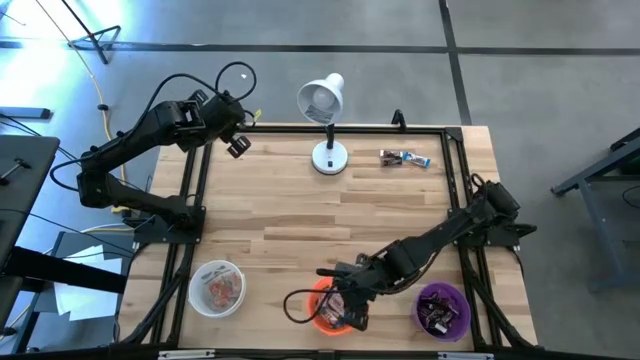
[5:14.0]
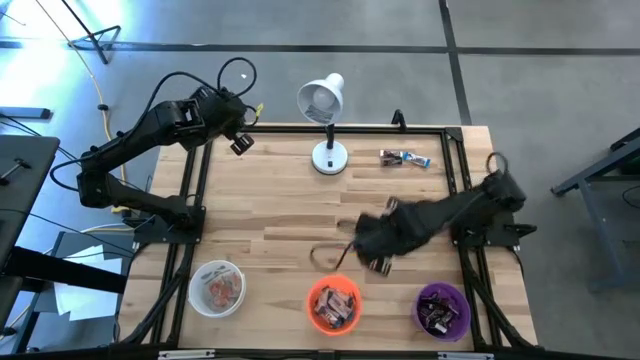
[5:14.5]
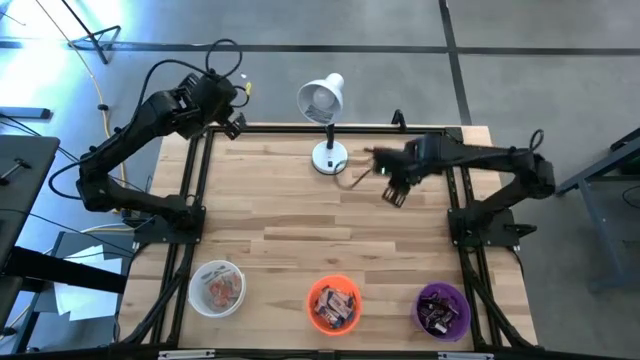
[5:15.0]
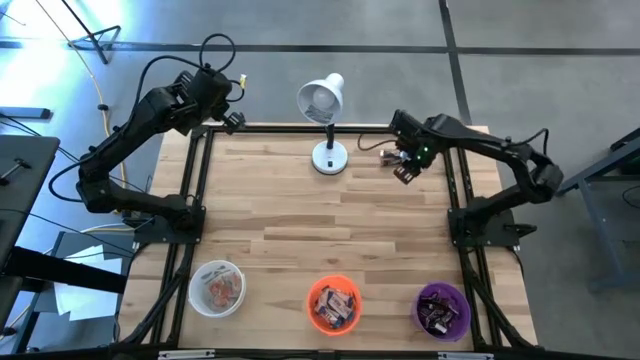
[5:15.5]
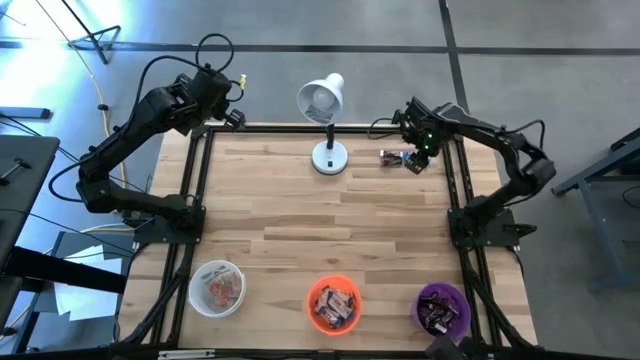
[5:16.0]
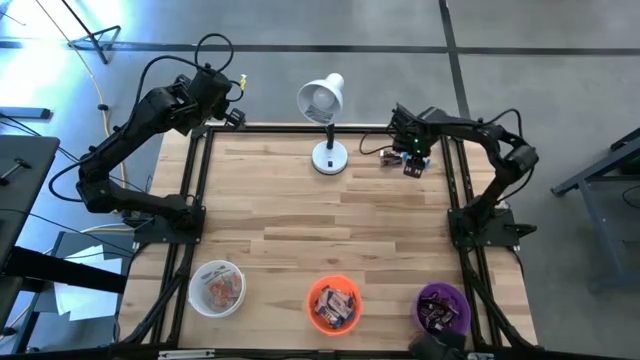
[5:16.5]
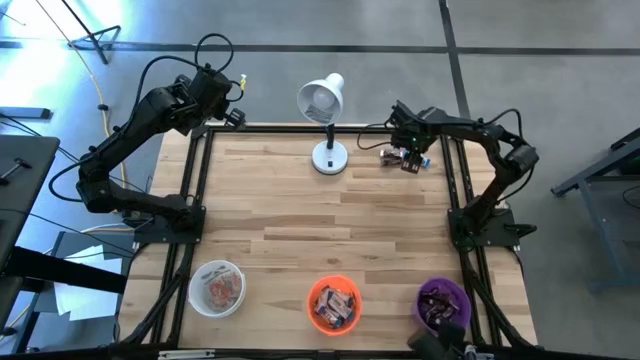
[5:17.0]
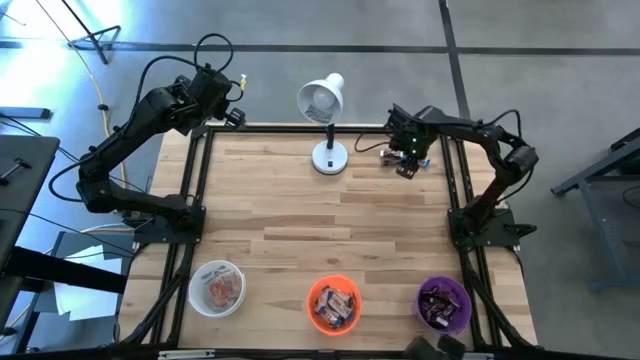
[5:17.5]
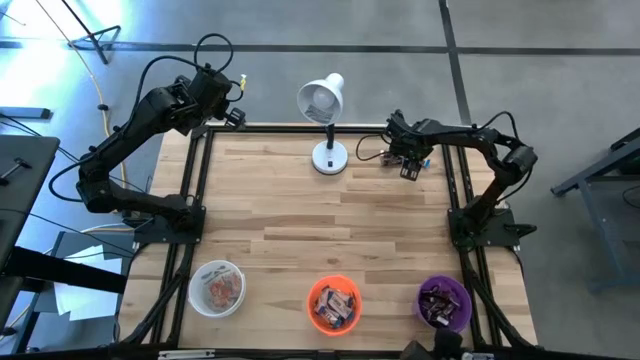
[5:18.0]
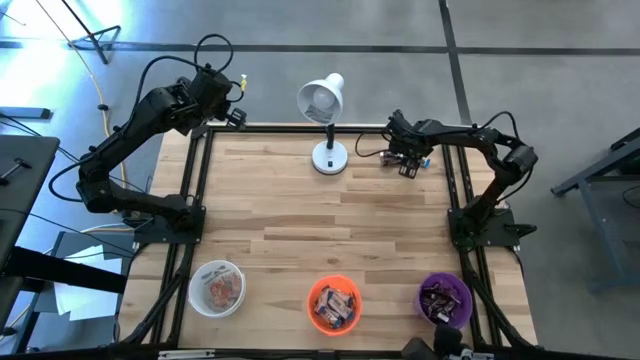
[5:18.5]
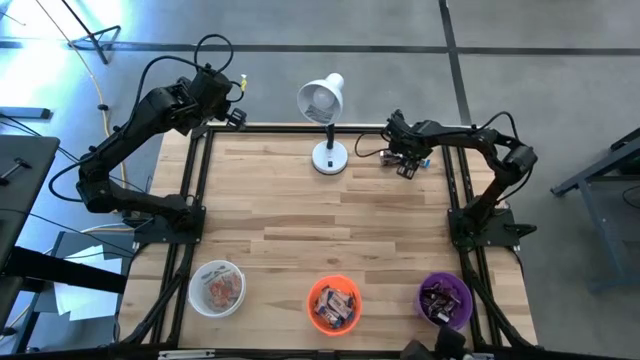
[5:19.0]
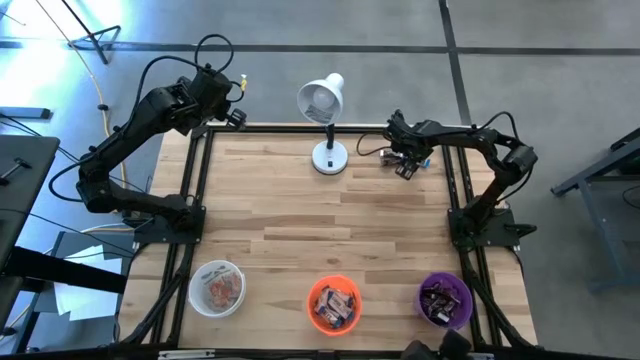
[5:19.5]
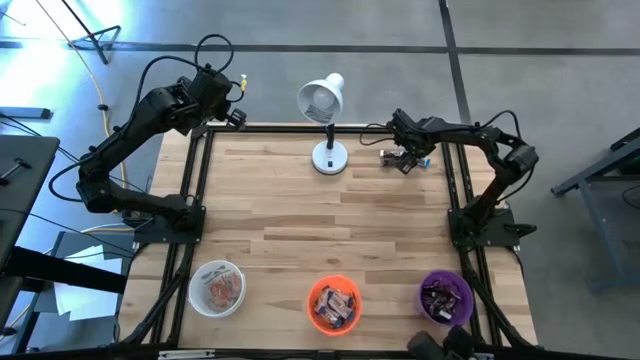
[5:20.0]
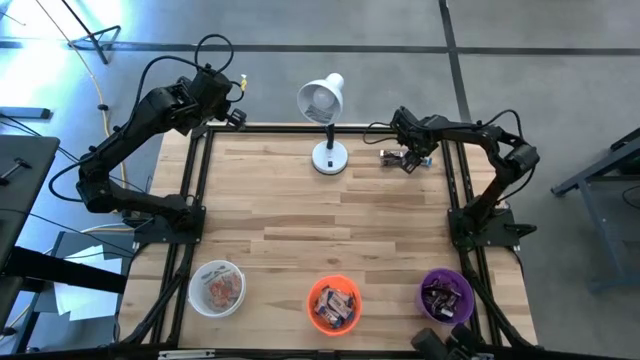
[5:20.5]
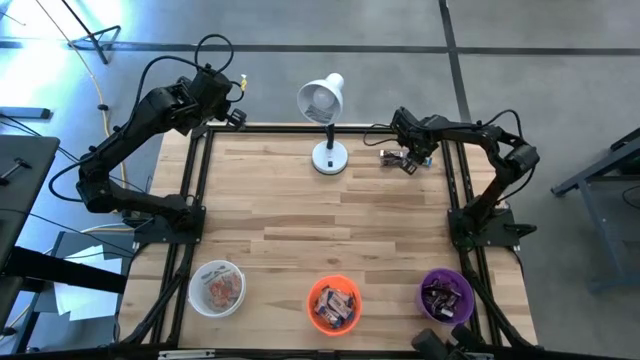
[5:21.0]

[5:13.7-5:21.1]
Task: Organize candy in baskets
Put the white chocolate bar into the orange bucket

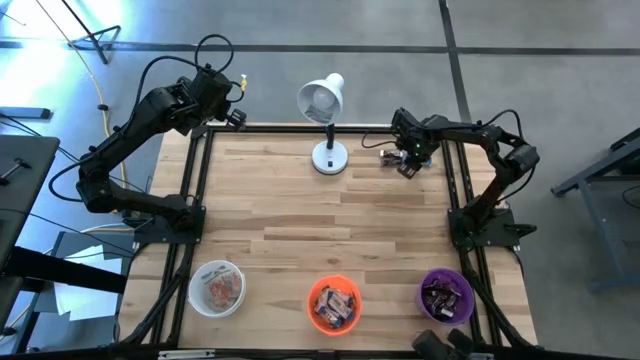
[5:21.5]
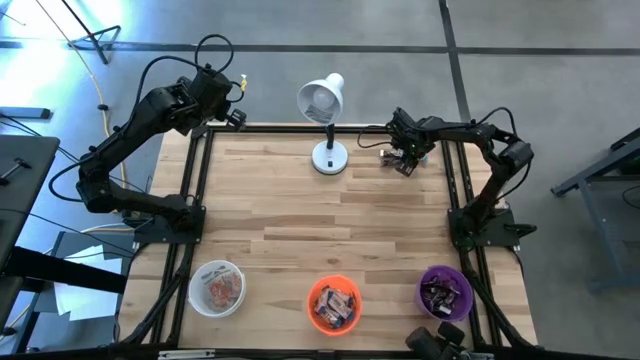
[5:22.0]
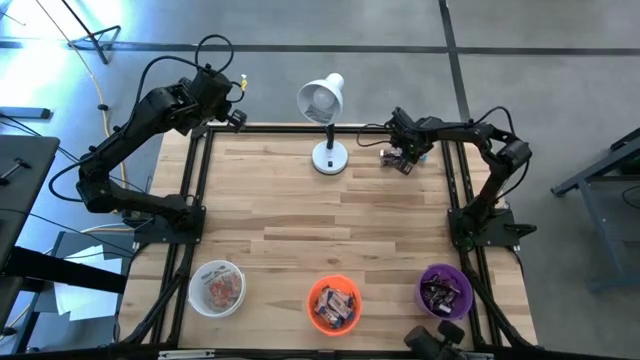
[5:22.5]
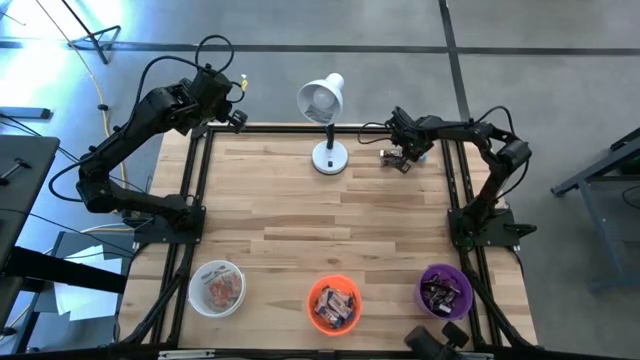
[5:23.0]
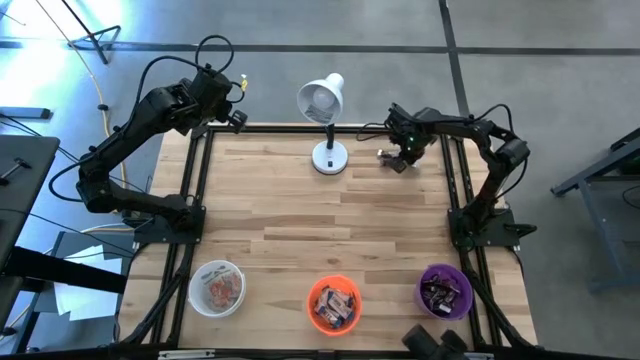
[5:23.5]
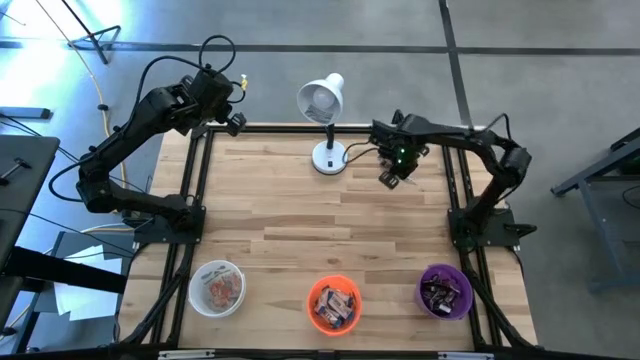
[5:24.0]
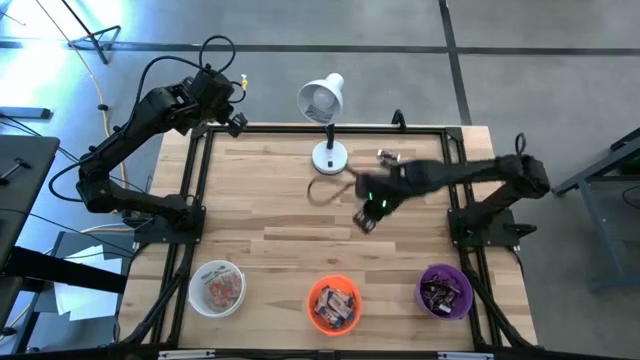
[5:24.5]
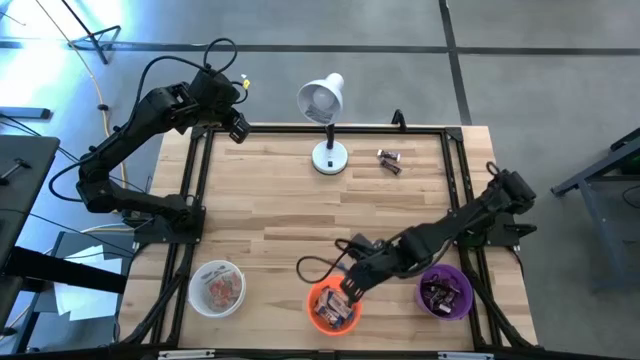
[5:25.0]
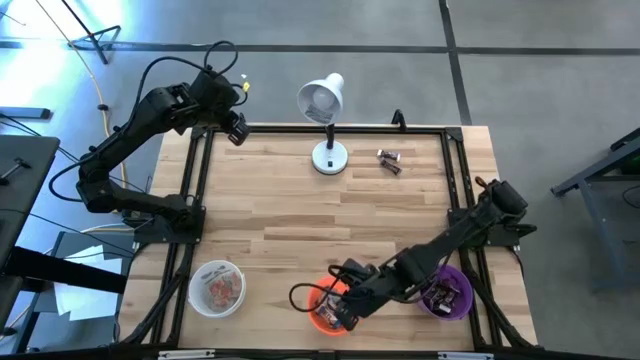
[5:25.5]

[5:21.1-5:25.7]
Put the white chocolate bar into the orange bucket

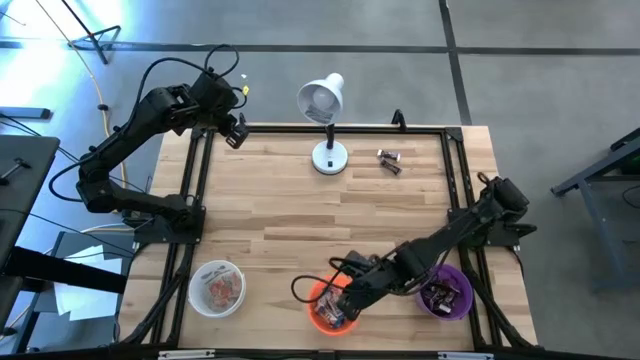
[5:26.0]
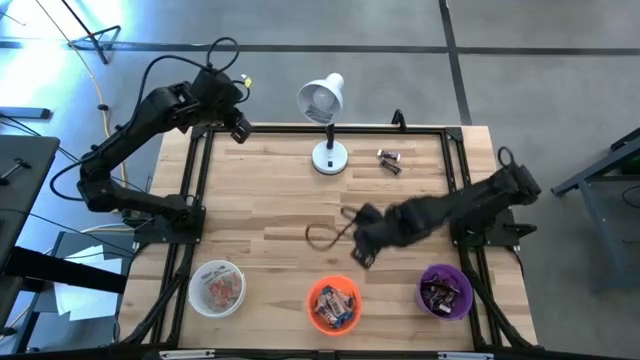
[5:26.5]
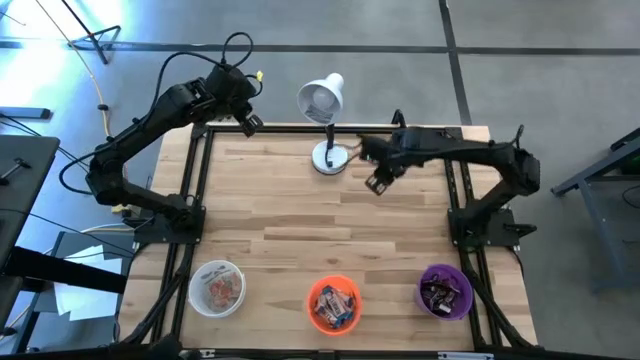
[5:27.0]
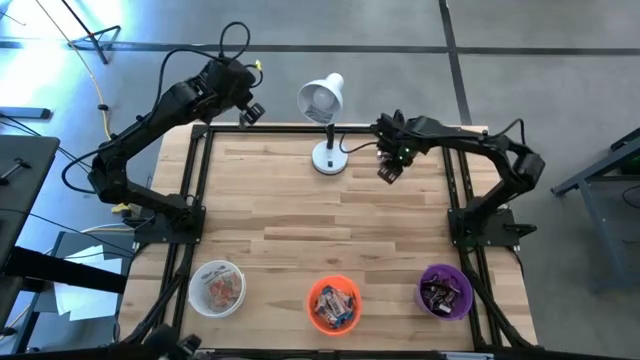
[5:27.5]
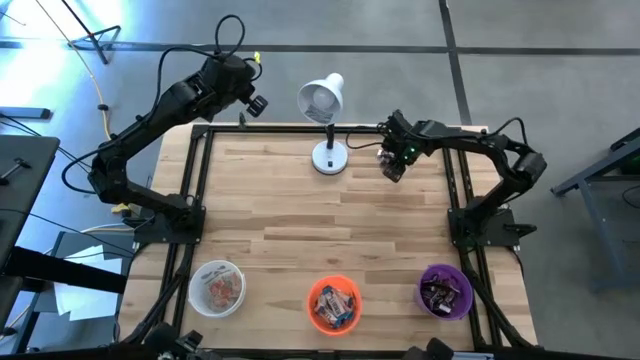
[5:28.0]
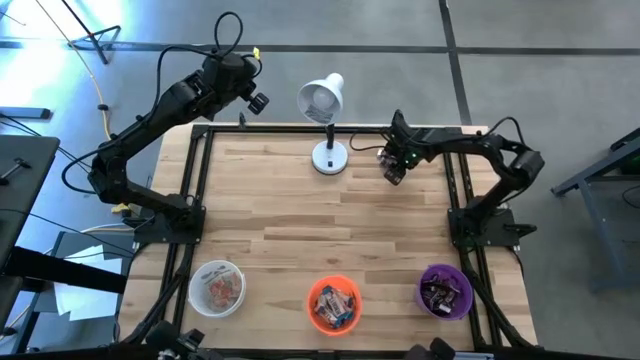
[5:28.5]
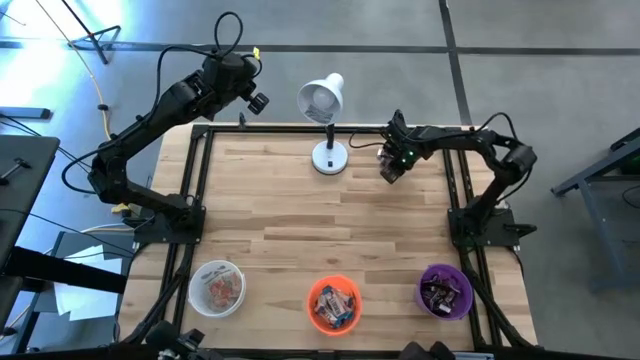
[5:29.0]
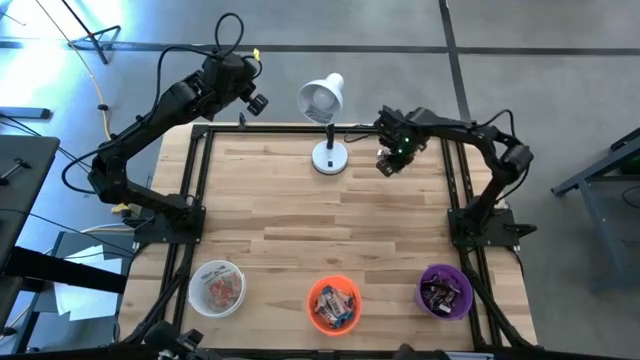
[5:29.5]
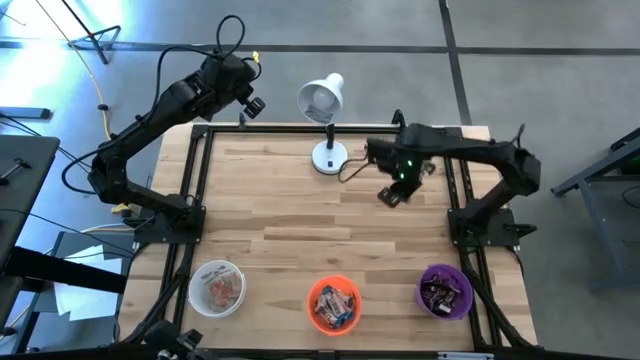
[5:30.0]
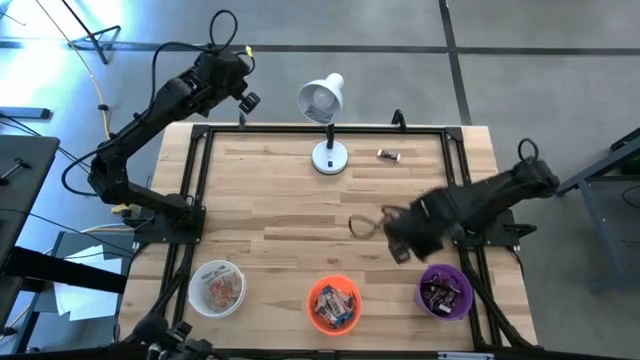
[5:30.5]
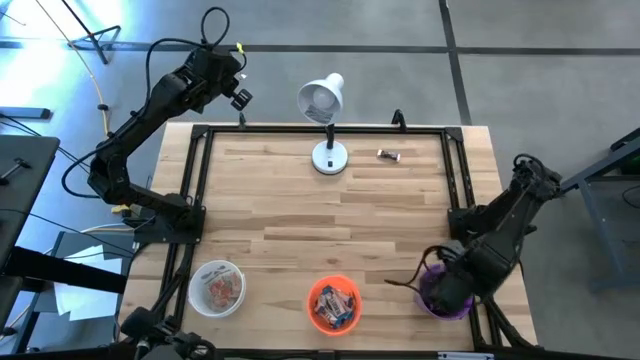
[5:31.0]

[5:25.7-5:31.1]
Put the brown chocolate bar into the purple bucket

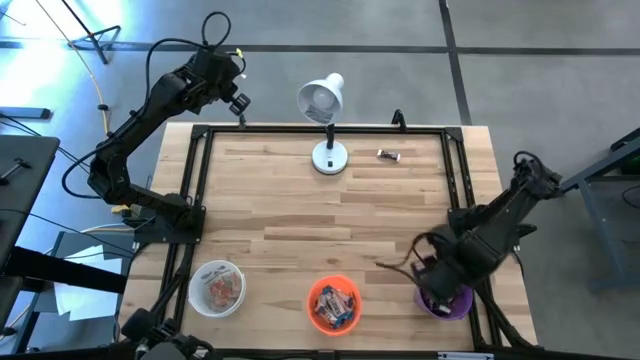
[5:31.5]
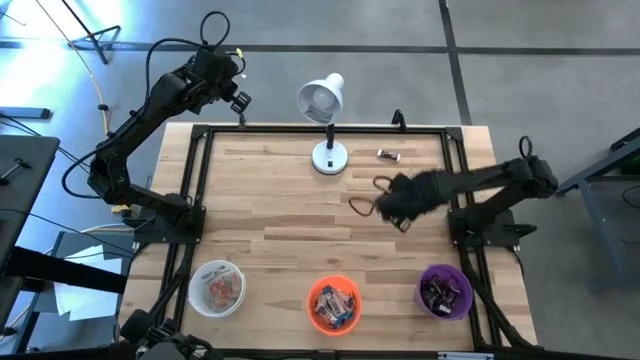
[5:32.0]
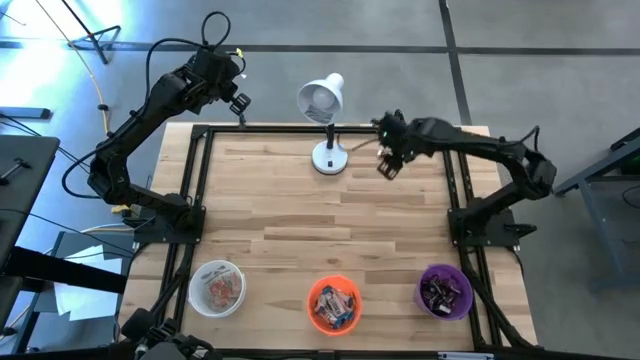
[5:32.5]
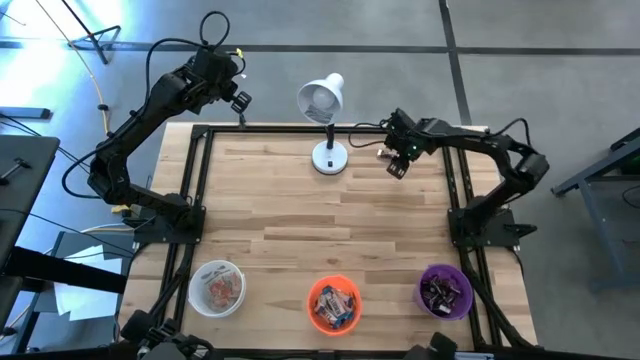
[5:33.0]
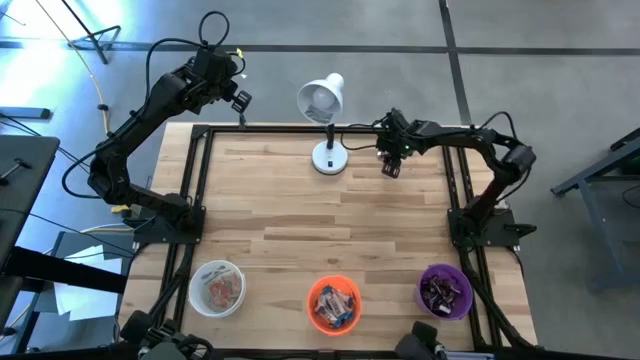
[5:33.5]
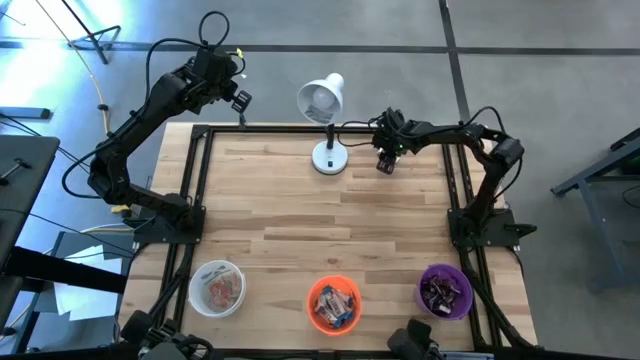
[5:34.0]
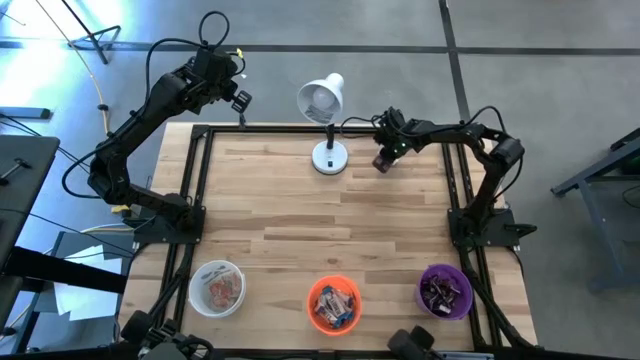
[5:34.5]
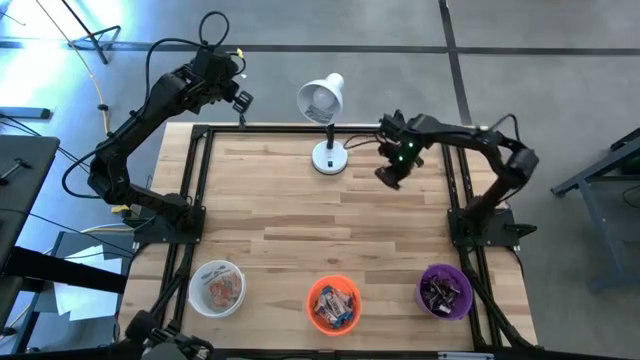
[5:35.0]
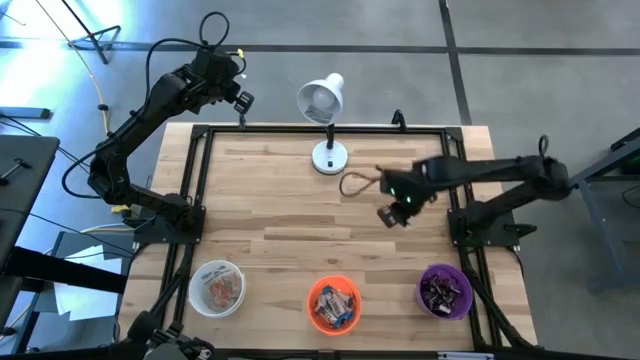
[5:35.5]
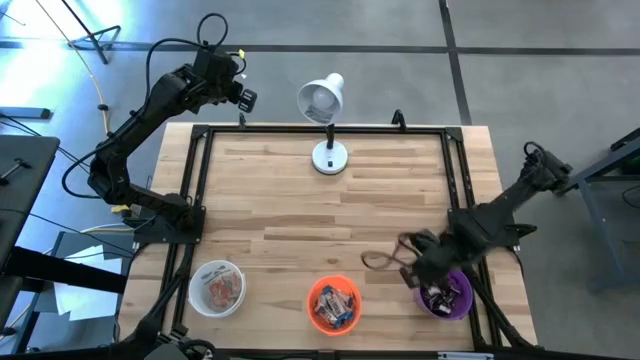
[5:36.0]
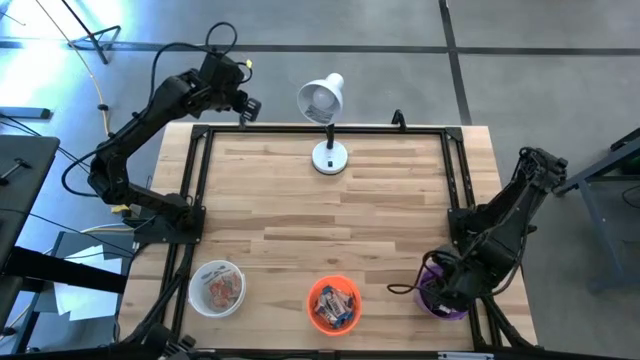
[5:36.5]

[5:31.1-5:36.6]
Put the brown chocolate bar into the purple bucket
